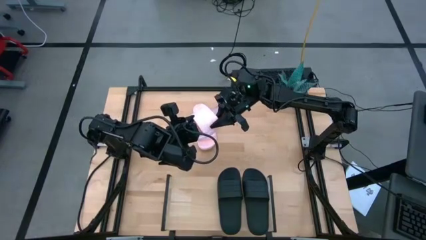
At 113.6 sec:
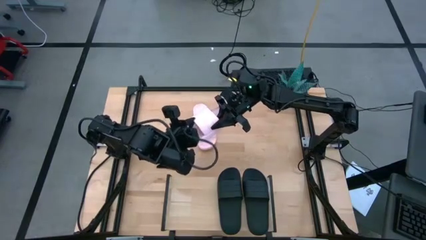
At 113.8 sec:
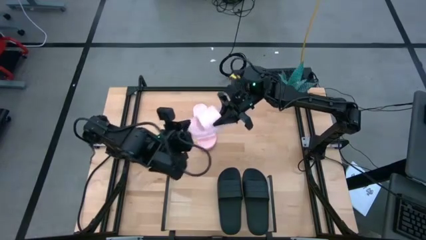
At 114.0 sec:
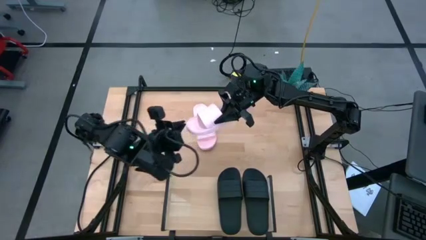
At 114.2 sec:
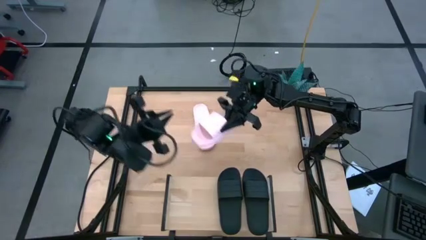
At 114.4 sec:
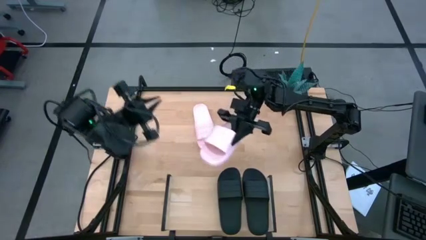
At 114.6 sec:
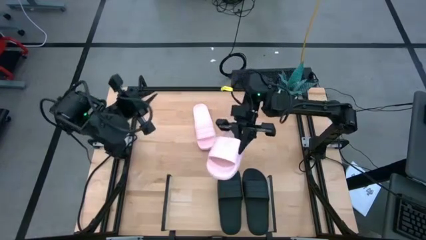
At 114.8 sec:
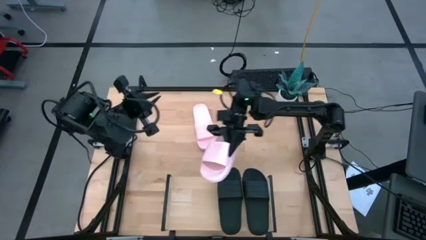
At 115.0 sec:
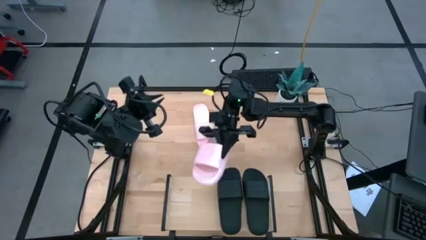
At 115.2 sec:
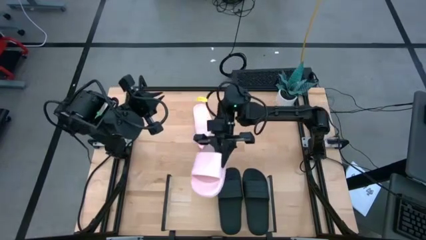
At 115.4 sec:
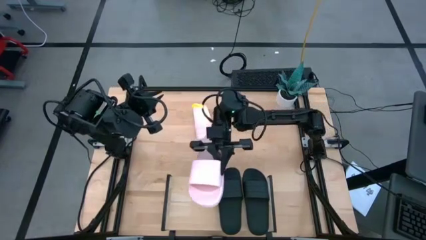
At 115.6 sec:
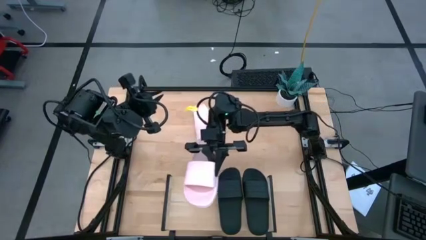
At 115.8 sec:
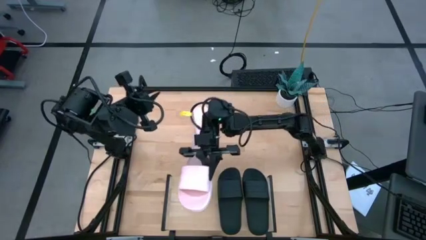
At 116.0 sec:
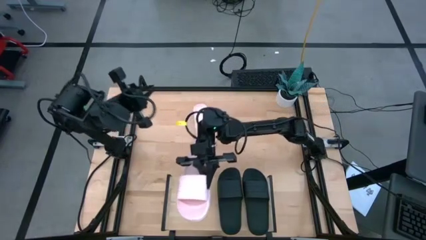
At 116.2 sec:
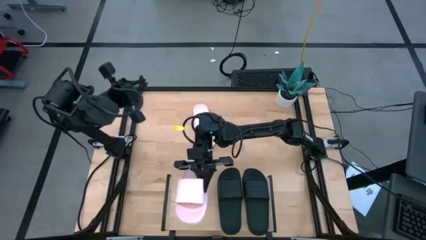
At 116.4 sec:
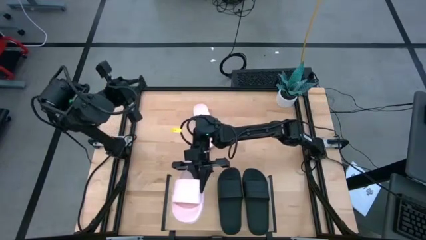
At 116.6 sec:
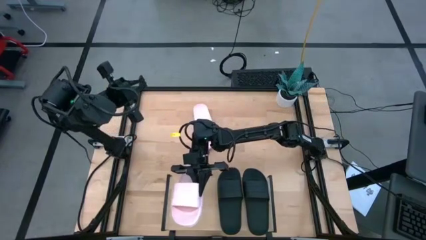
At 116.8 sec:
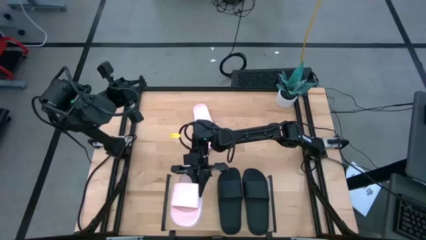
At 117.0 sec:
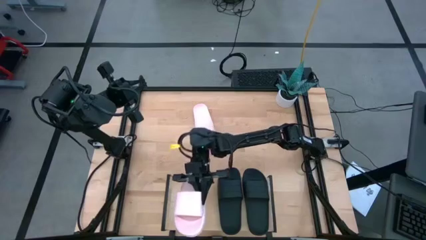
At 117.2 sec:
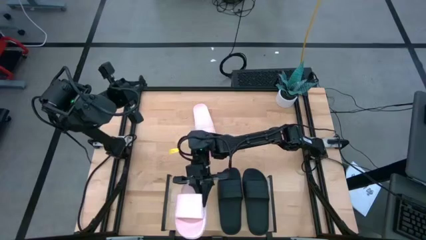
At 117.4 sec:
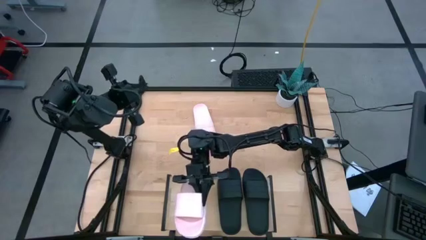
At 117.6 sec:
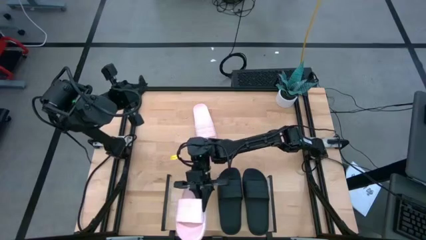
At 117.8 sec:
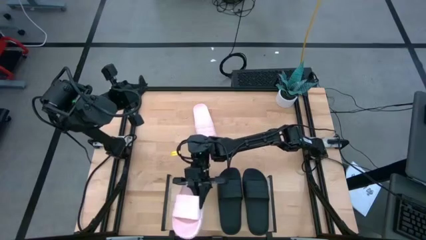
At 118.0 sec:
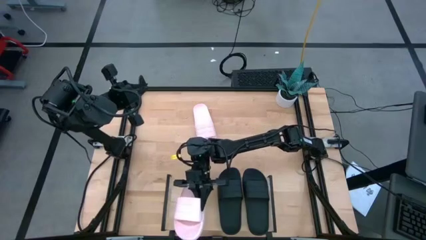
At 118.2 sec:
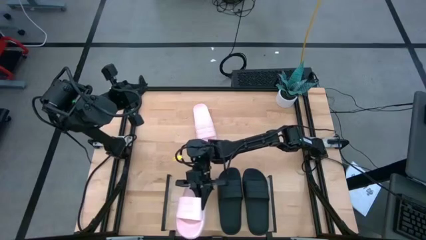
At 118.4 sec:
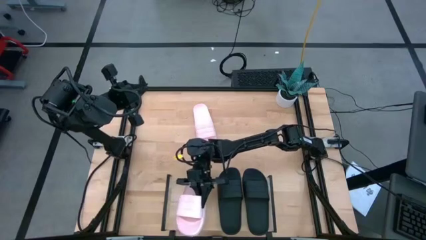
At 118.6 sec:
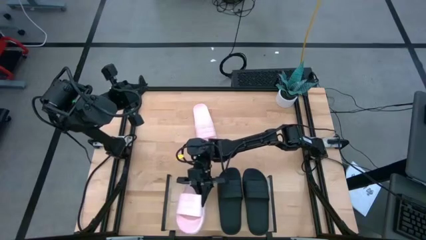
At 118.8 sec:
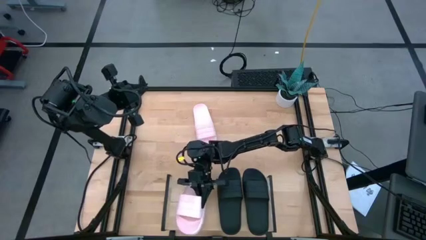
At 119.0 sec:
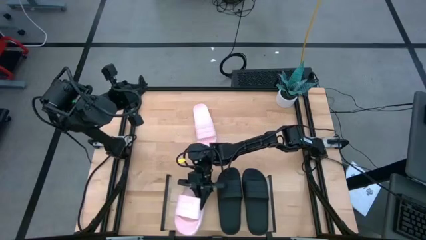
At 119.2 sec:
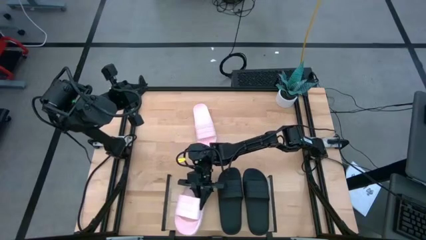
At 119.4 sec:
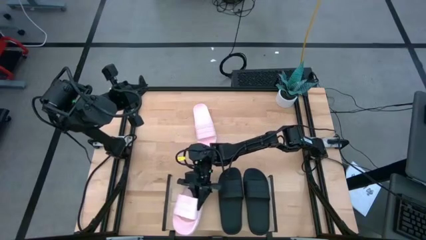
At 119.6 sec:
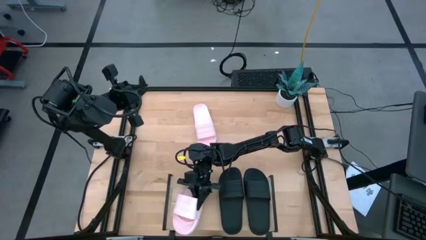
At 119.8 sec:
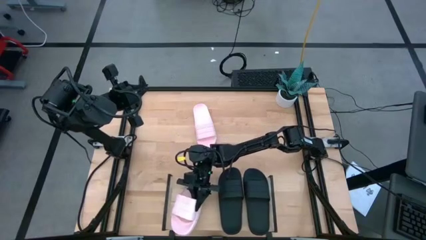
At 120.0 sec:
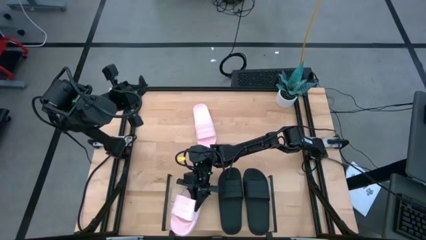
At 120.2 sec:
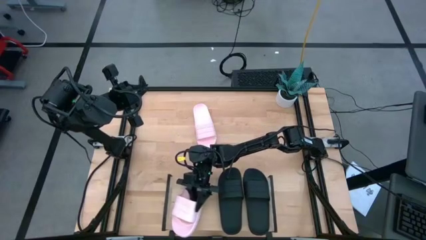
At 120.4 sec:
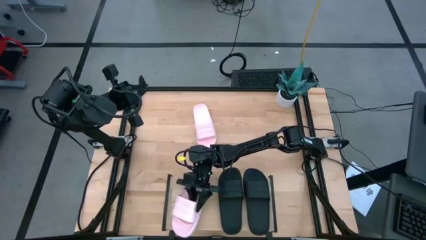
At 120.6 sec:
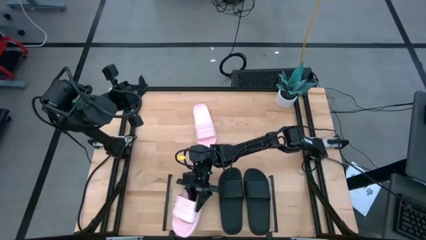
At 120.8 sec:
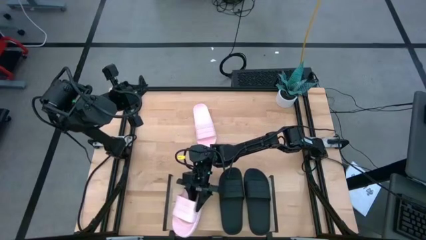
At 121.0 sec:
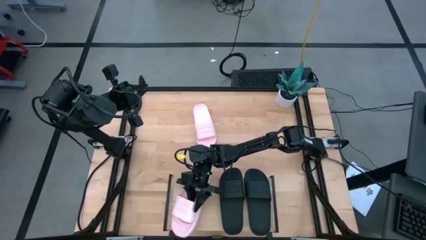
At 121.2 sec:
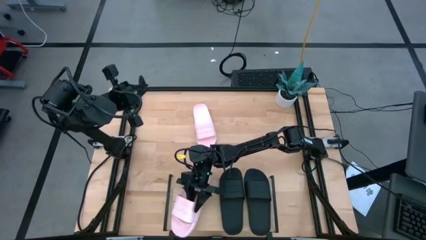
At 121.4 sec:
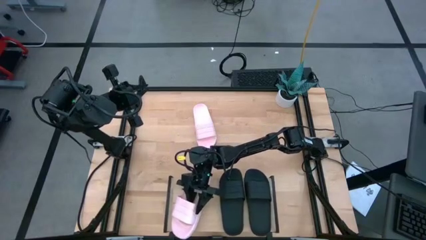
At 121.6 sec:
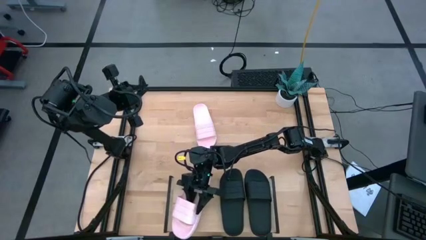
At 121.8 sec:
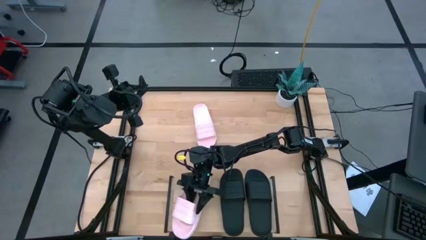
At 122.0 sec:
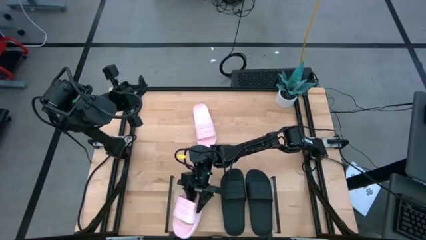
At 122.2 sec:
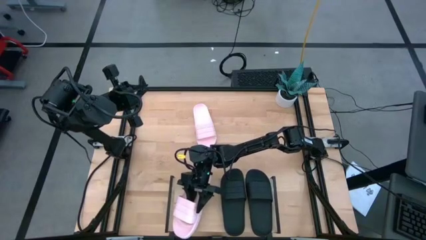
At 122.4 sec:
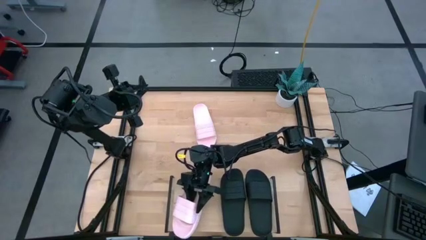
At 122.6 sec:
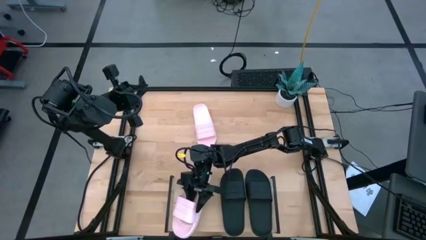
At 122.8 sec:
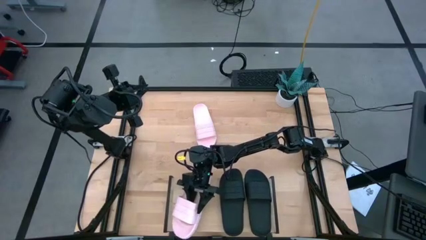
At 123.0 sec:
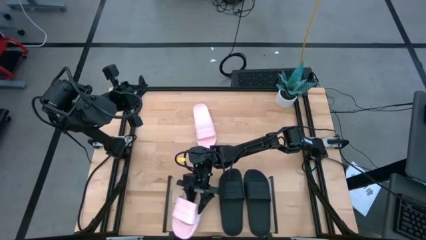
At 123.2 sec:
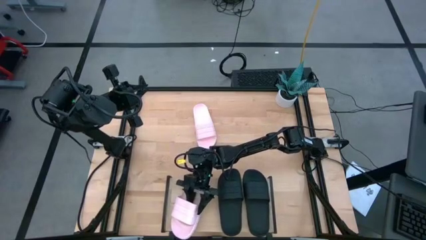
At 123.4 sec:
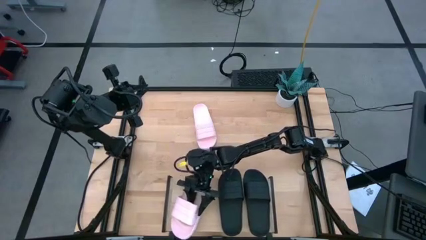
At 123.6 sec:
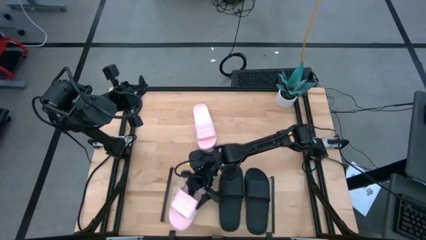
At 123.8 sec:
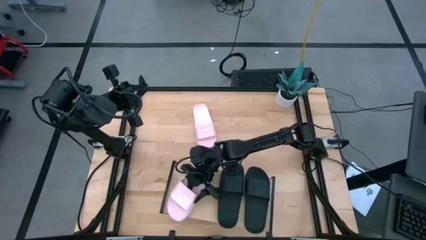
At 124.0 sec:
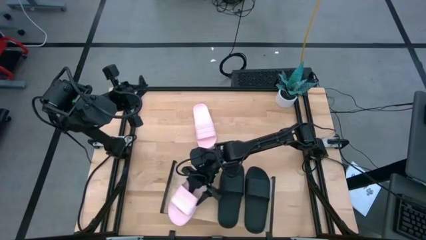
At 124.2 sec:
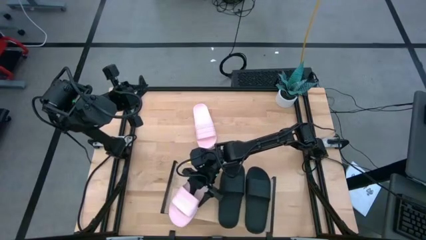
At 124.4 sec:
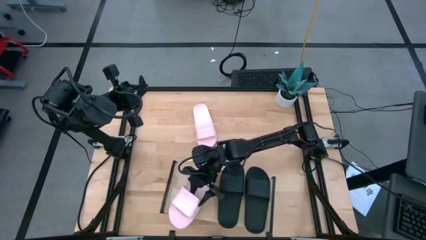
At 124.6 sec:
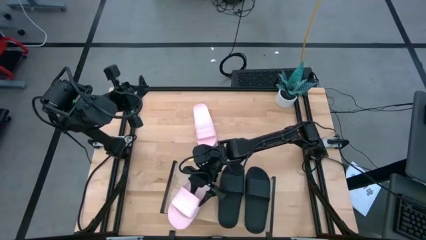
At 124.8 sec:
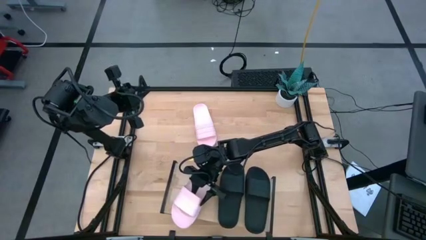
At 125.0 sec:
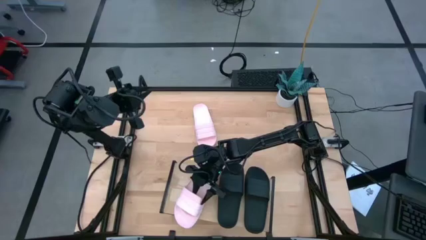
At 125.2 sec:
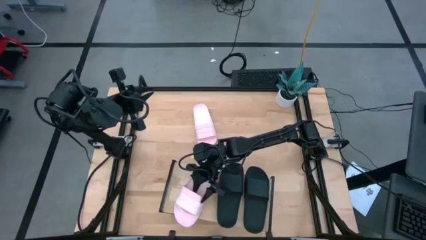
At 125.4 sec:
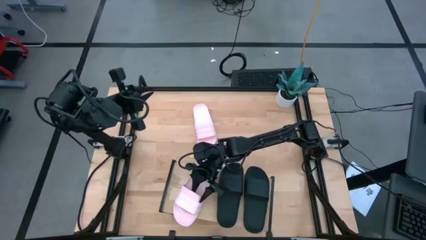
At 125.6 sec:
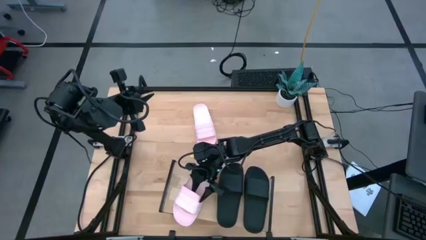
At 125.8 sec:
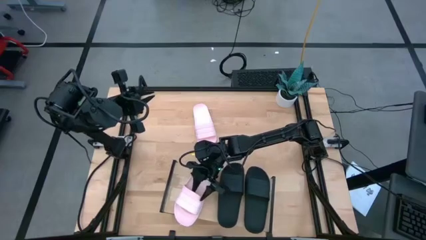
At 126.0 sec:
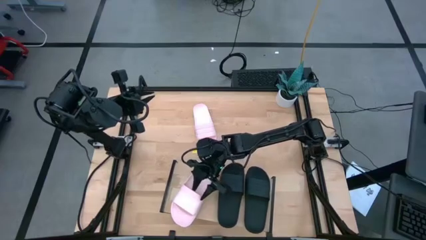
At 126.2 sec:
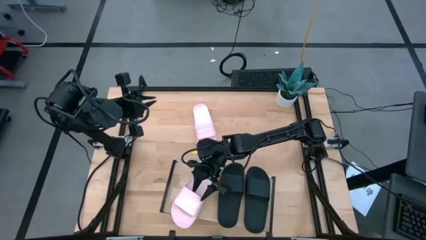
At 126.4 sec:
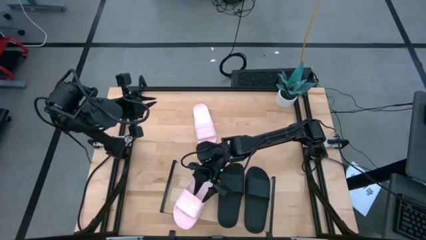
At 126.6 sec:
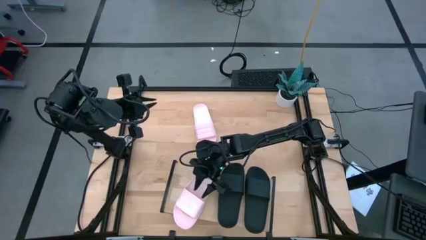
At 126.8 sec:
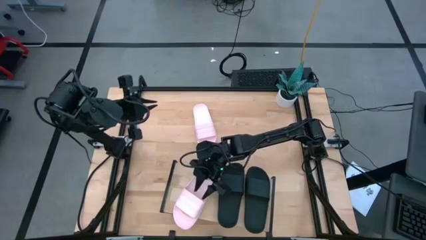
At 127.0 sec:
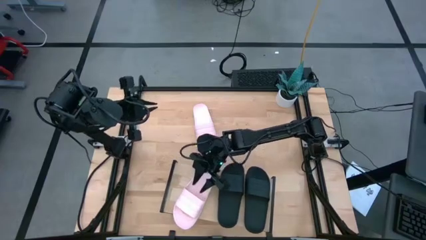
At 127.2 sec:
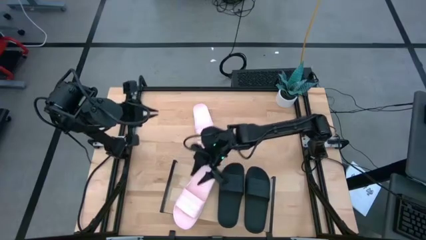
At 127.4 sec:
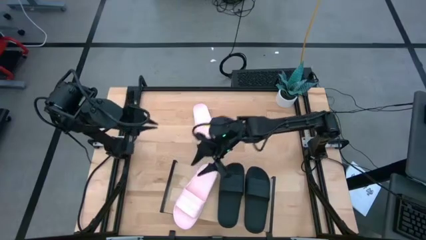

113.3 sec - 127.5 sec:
Task: Pick and place slides into the shelf
Put the left pink slipper on the shelf
